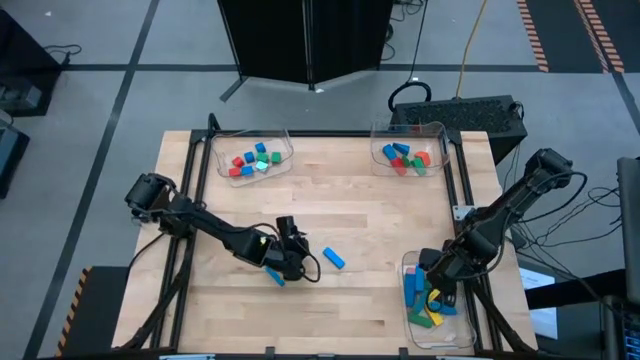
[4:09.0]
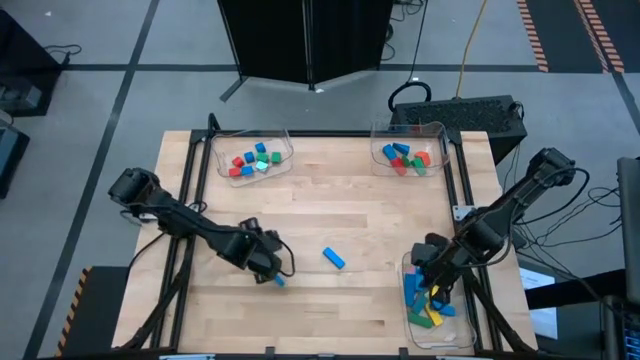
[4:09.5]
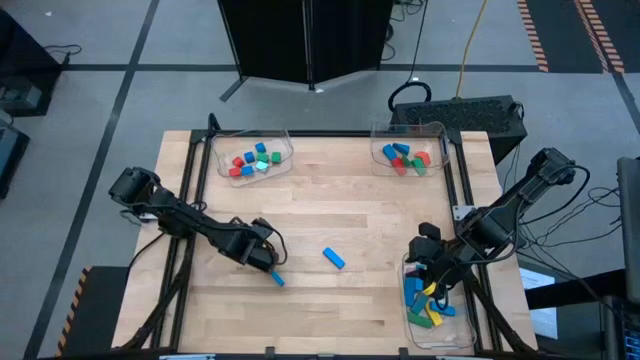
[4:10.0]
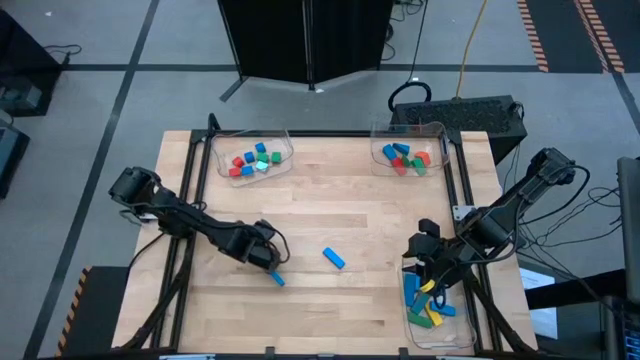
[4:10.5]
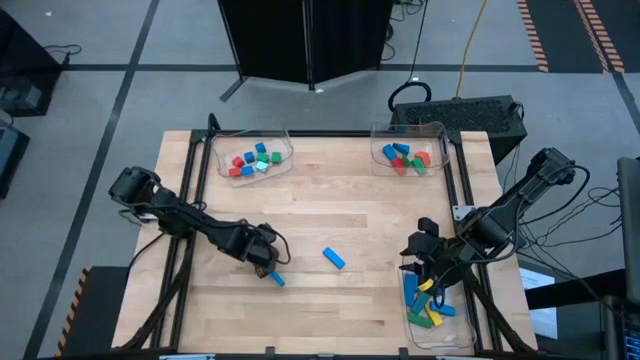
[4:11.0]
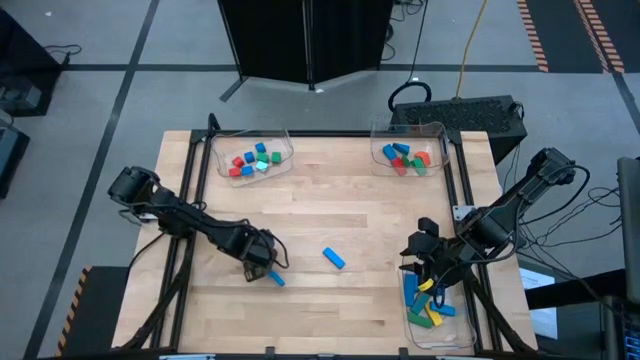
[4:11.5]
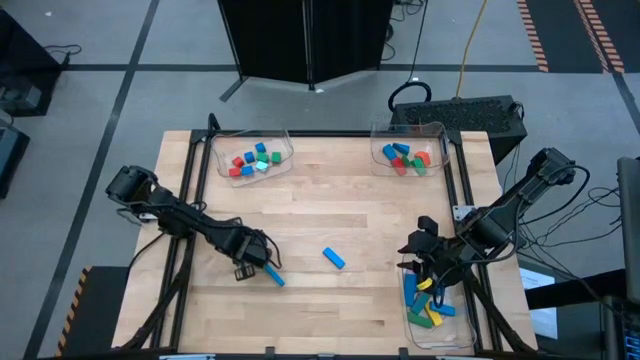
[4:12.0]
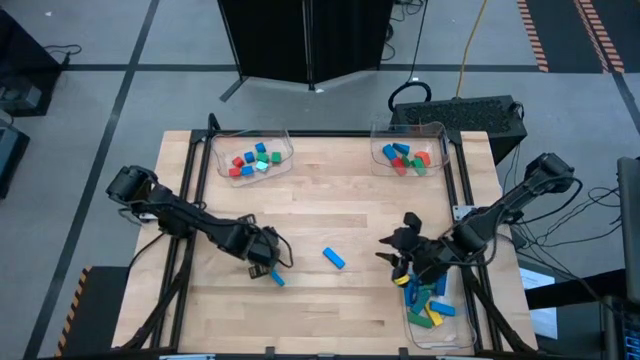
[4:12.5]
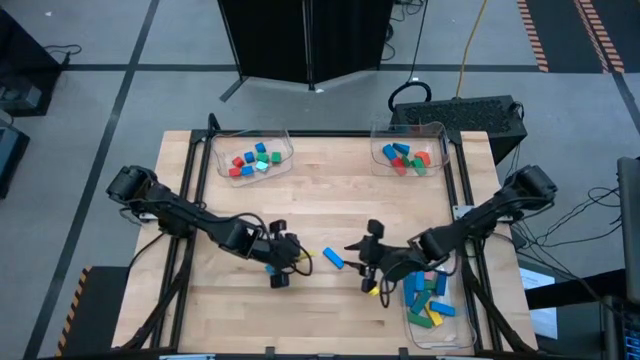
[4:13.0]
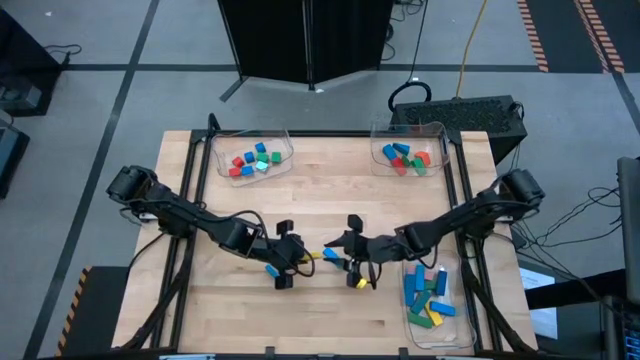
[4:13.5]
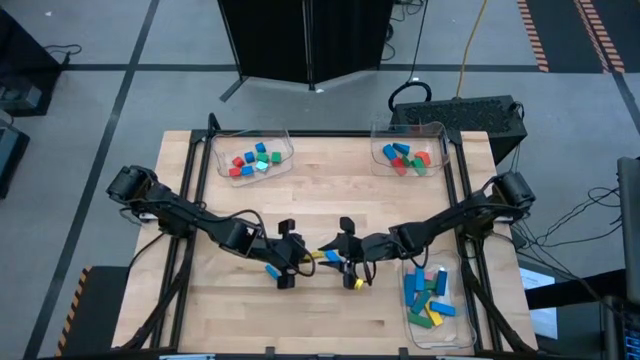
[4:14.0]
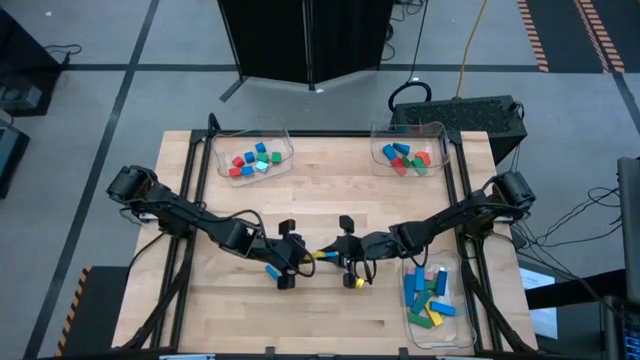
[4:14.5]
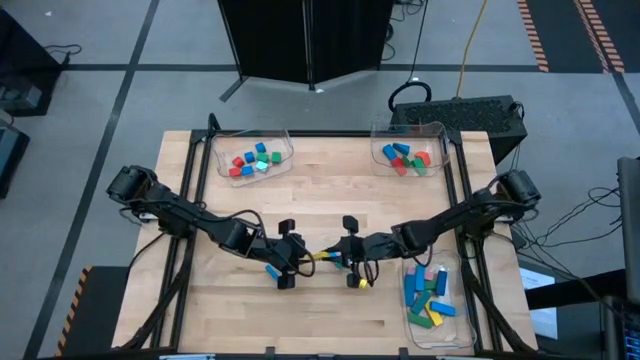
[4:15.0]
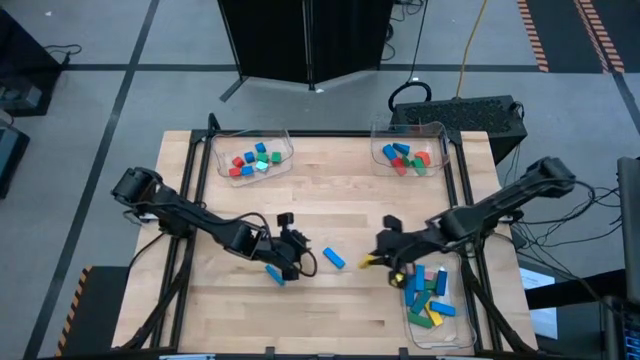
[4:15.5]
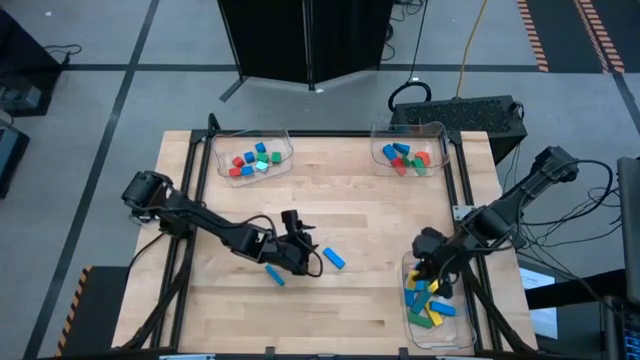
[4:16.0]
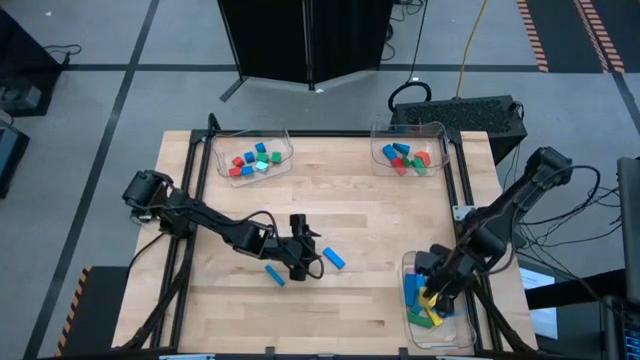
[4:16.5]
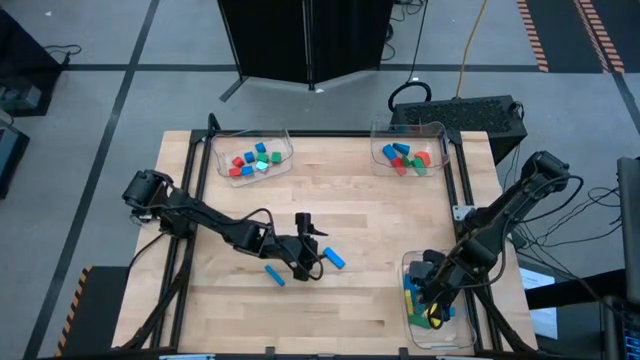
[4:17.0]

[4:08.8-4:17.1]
Task: Sort blocks by size
Put the yellow rectangular block into the bottom right transparent bin

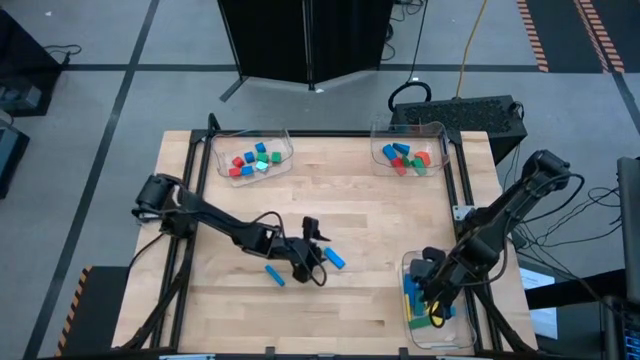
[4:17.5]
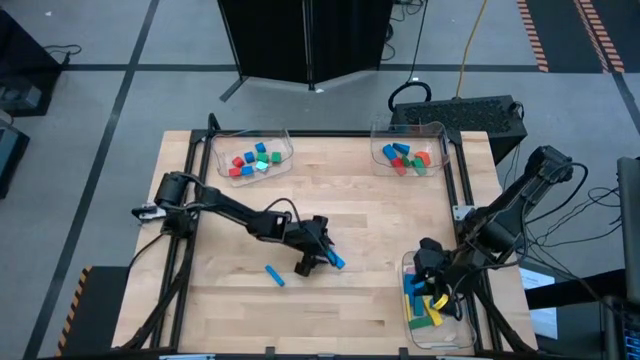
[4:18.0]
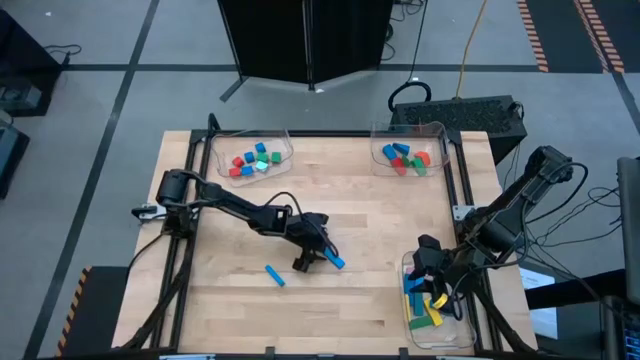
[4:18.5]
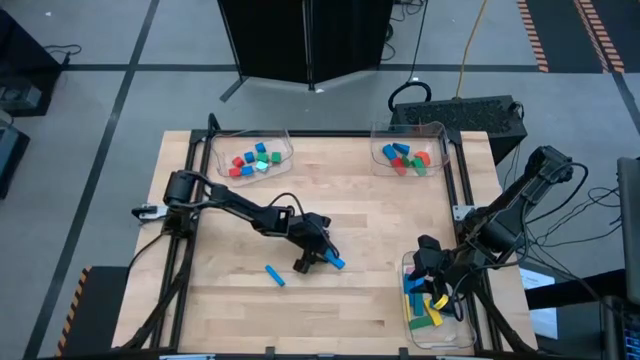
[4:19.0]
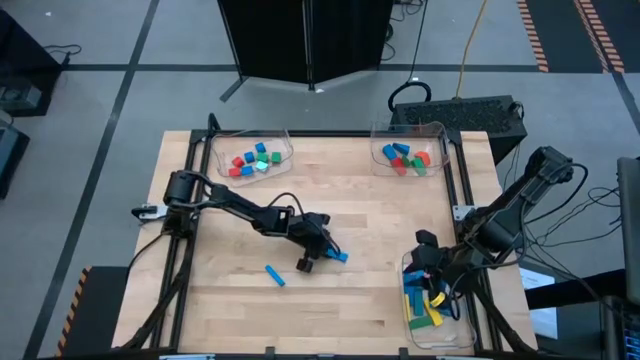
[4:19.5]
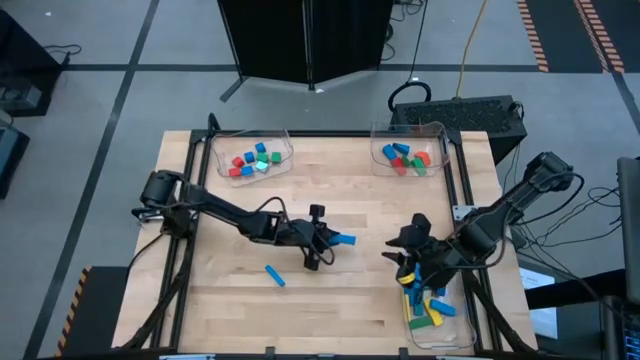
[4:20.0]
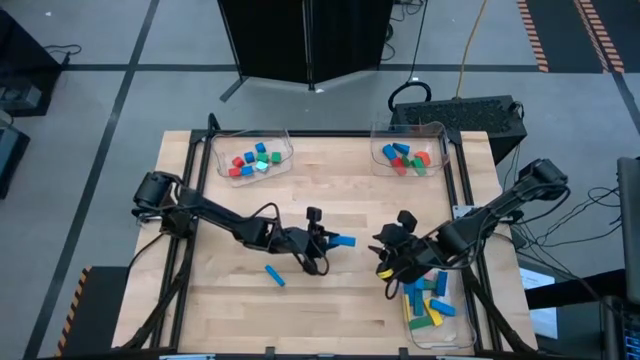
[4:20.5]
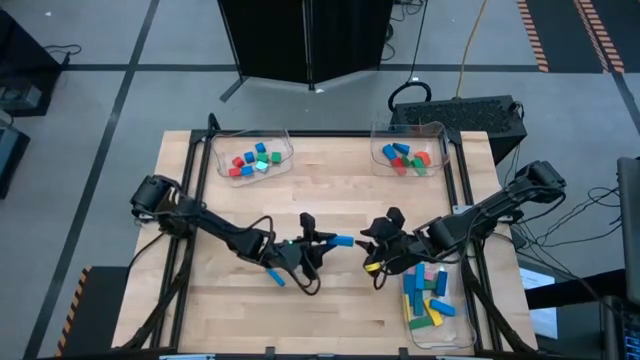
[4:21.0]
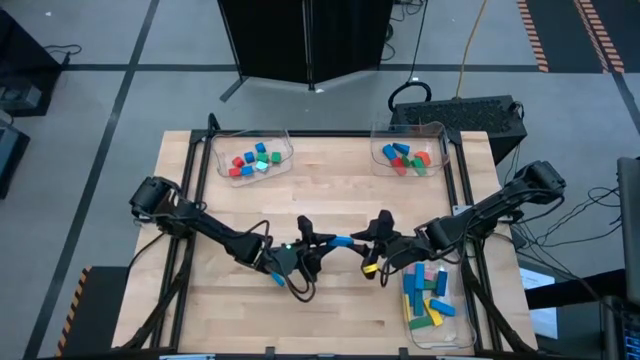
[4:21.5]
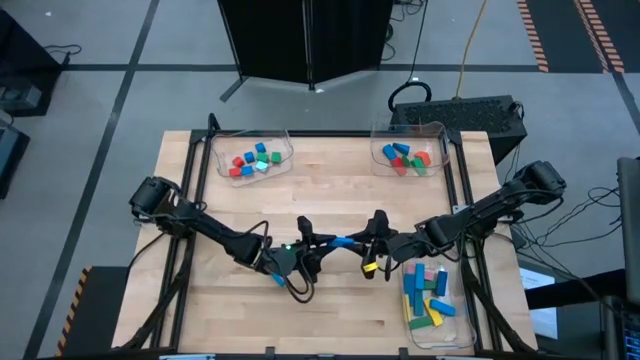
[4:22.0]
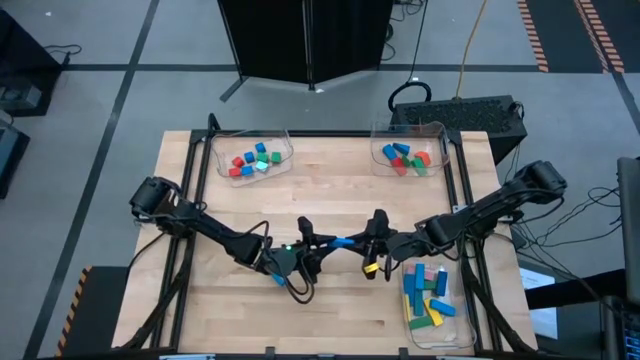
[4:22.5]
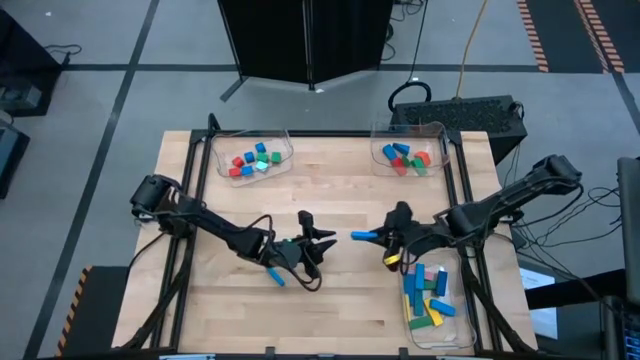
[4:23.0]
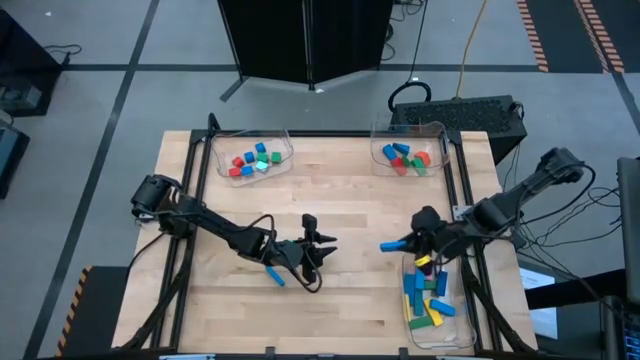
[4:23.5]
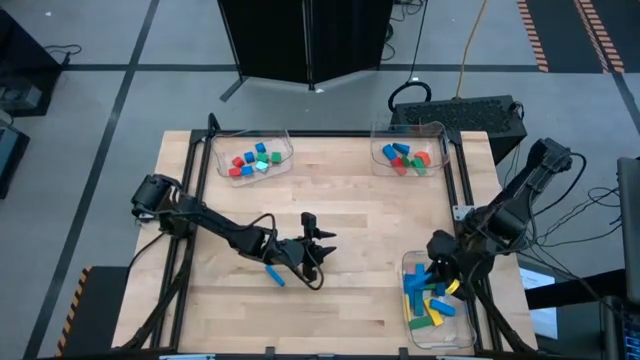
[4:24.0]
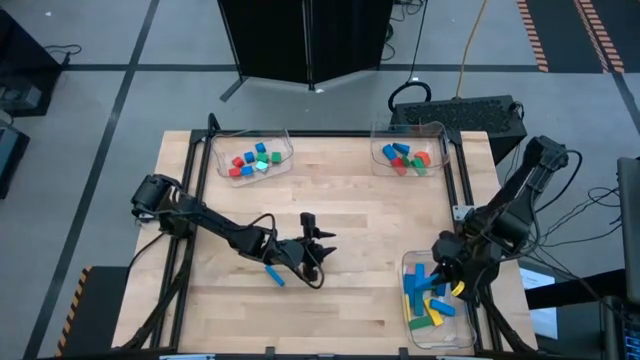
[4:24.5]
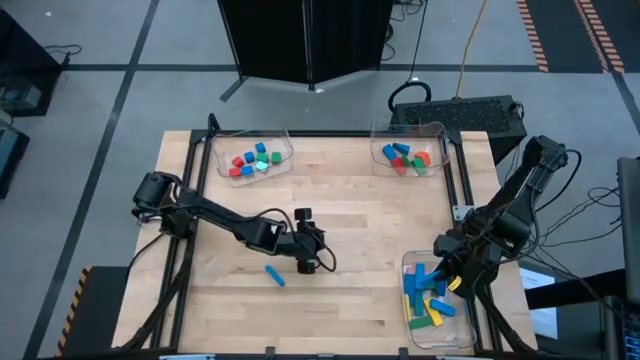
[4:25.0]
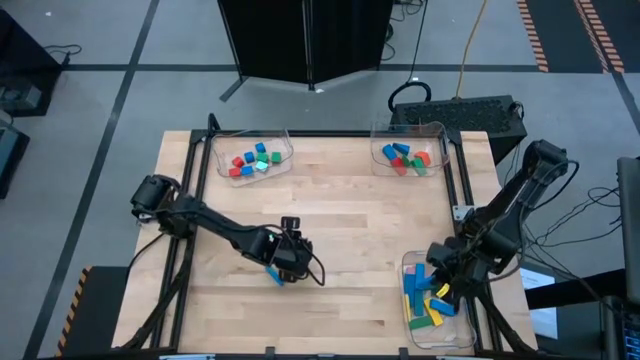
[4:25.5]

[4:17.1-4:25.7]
Put the blue rectangular block into the bottom right transparent bin

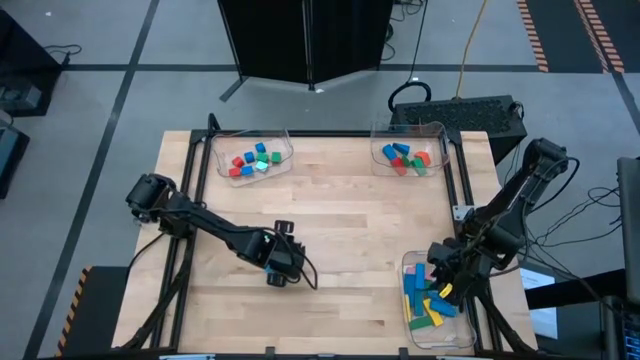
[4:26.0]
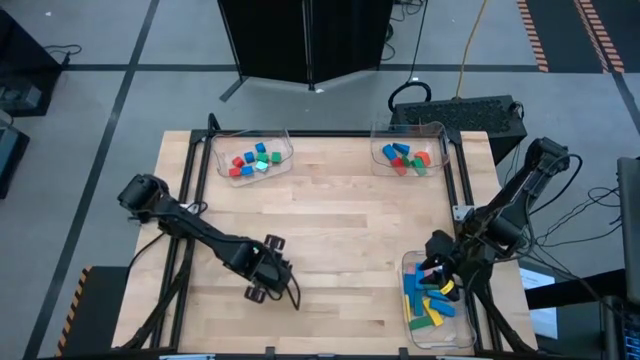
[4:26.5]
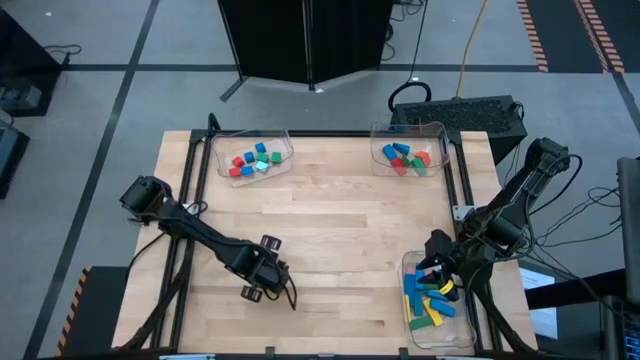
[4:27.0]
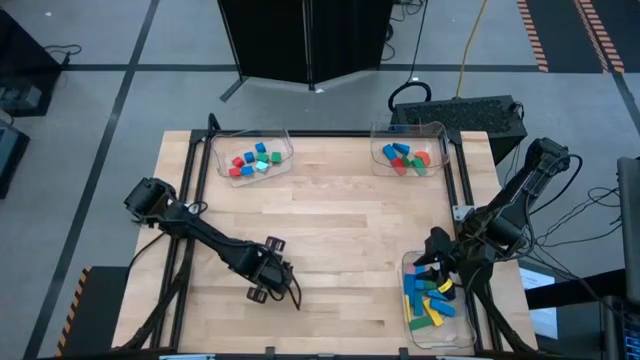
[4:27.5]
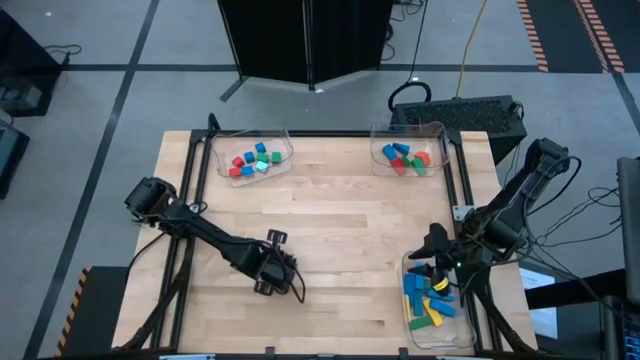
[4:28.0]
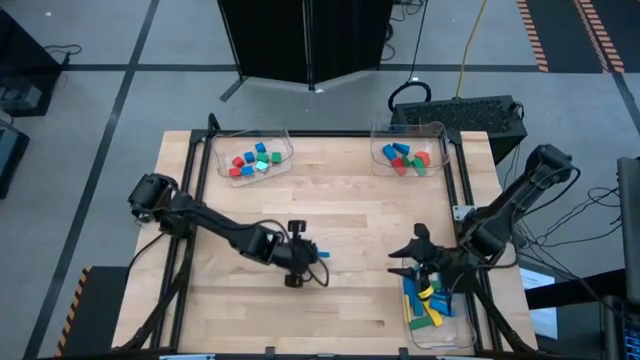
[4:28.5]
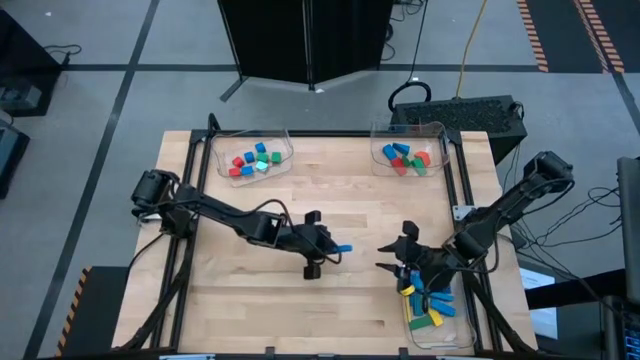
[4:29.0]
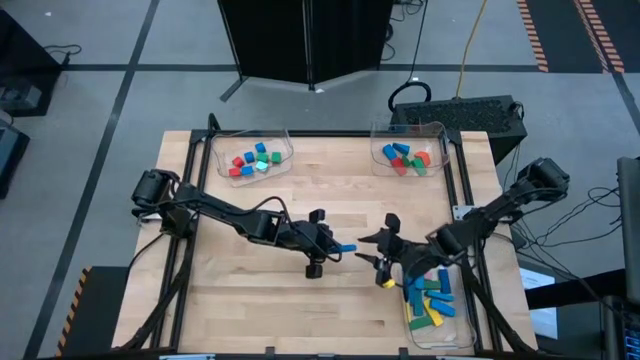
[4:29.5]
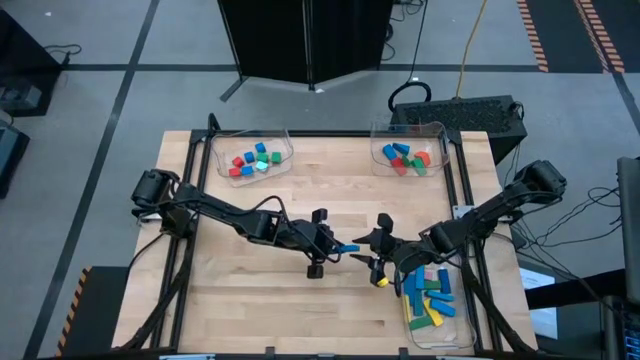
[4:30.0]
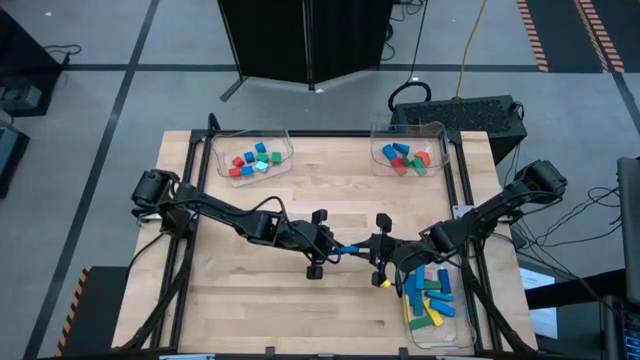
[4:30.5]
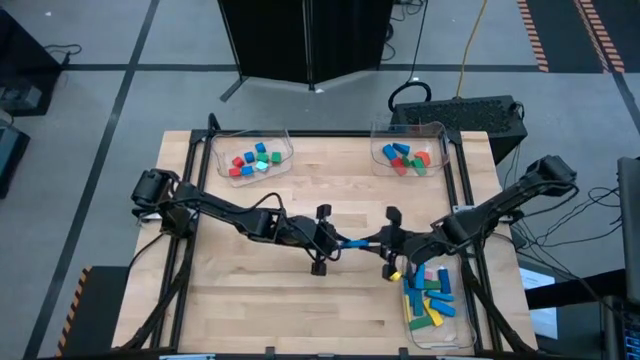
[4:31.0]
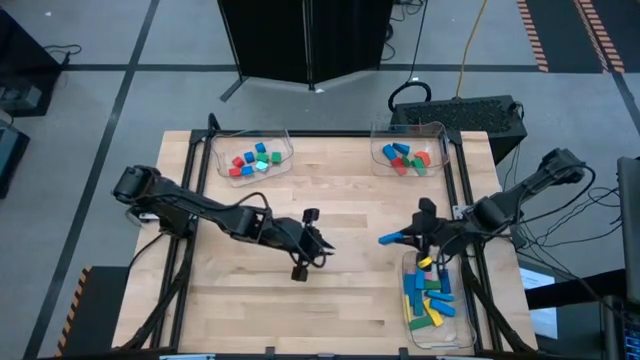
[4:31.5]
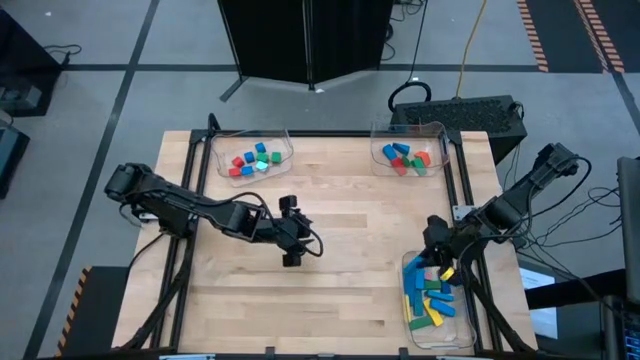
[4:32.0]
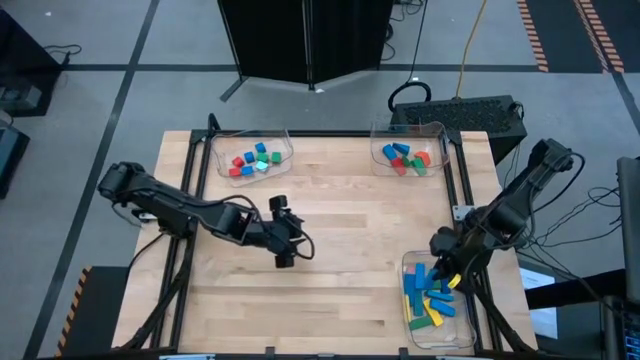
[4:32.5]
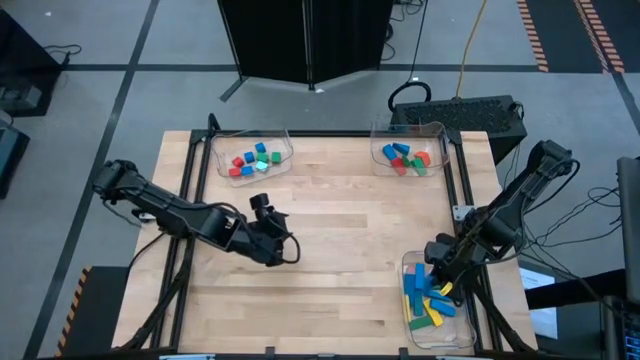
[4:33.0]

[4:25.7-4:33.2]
Put the blue rectangular block into the bottom right transparent bin
